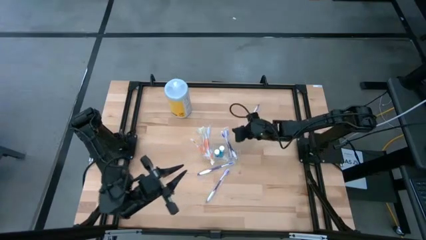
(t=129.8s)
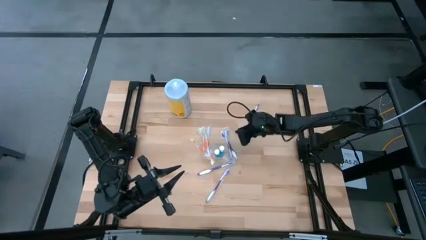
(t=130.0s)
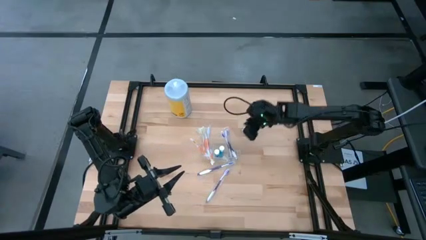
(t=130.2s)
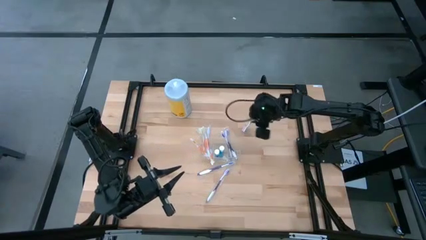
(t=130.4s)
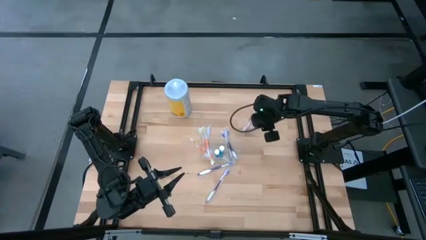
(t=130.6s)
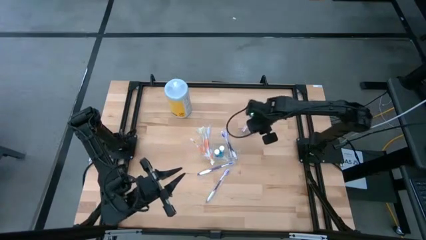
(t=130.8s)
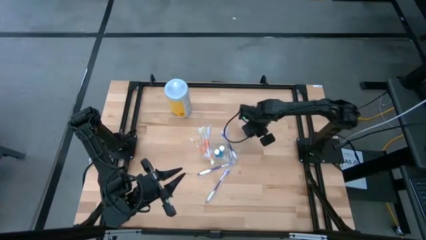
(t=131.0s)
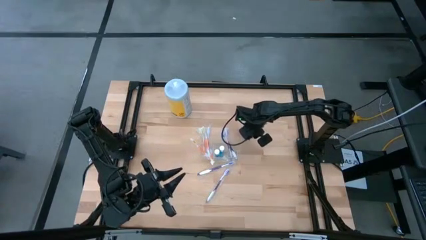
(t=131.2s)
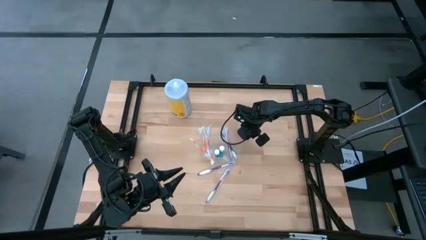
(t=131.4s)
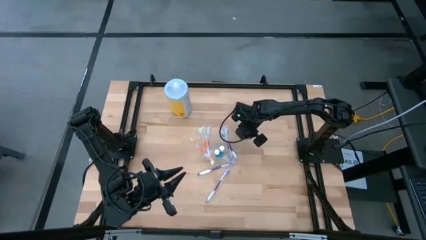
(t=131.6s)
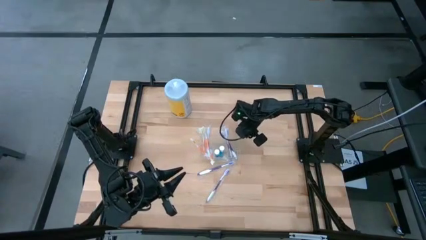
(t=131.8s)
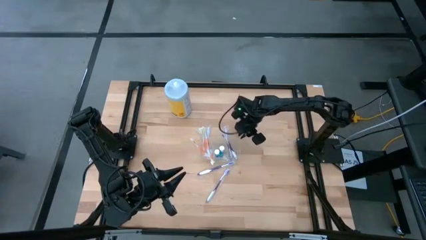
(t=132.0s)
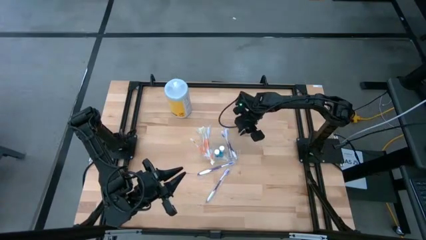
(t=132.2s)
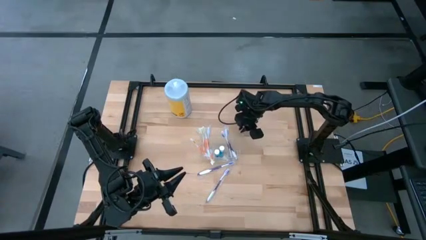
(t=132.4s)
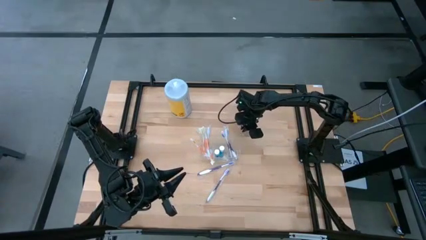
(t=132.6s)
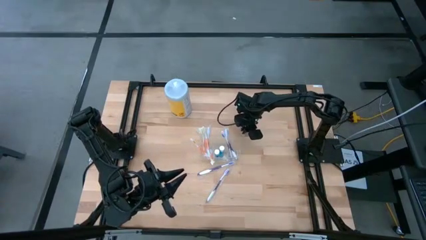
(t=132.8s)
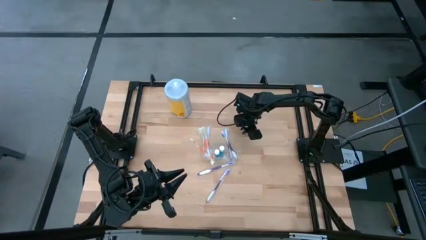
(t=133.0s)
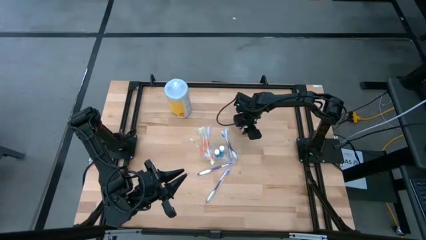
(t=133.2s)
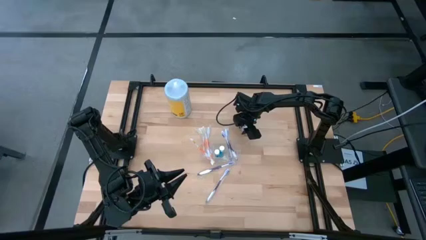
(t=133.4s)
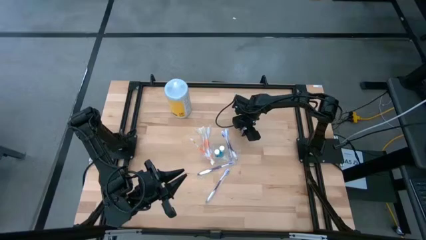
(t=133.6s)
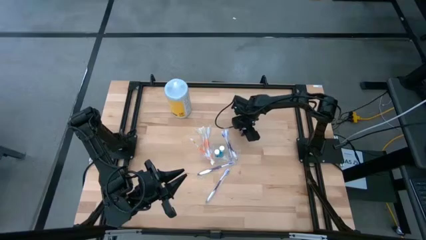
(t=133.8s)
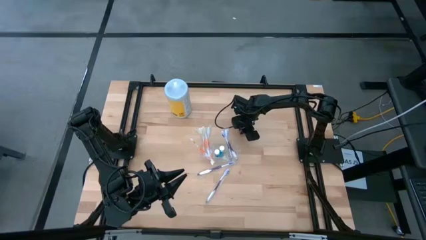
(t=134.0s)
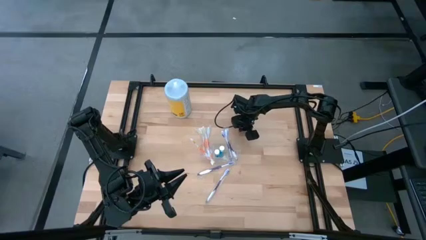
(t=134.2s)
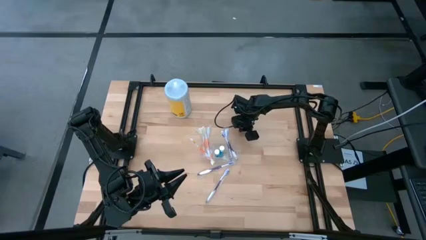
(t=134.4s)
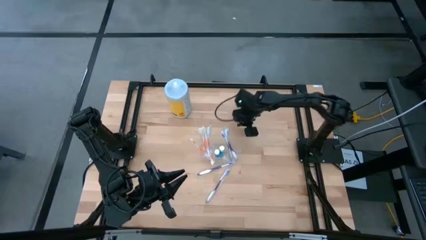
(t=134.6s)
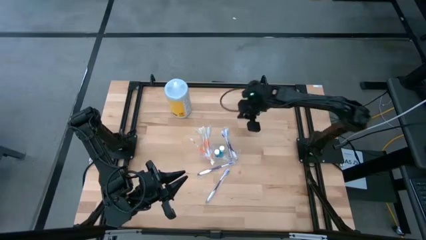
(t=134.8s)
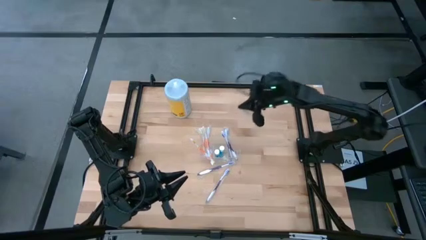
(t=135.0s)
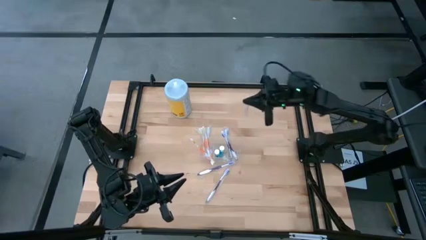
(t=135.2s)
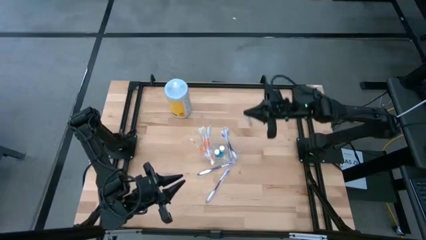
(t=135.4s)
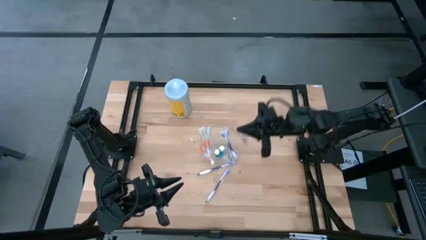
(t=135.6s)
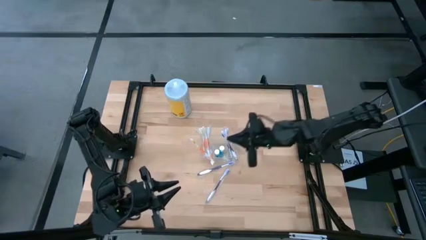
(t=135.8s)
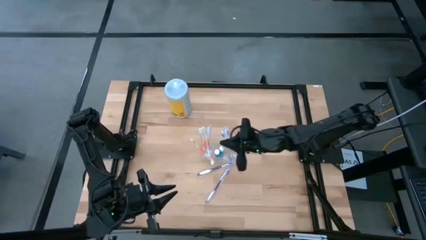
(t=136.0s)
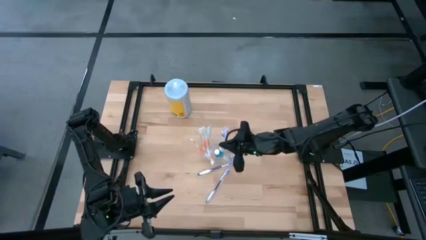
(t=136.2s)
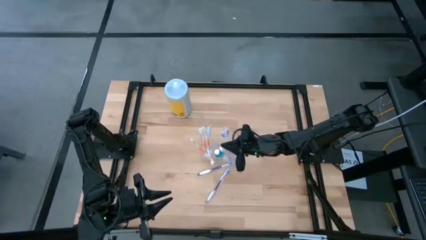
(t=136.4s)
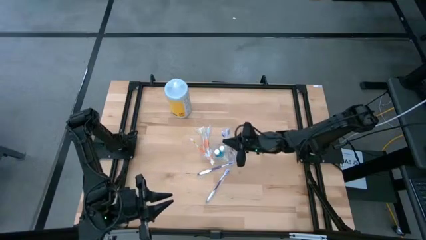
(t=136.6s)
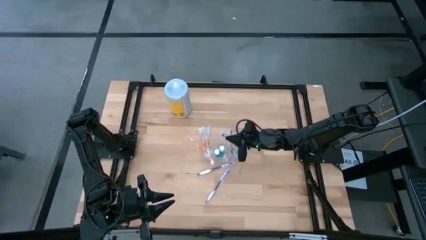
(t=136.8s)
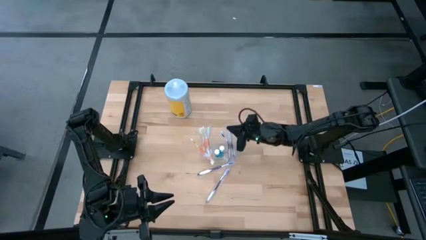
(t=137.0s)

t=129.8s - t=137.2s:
Task: Pick & Place toothbrushing station
Put the white and violet toothbrush into the right compartment of the transparent organizer

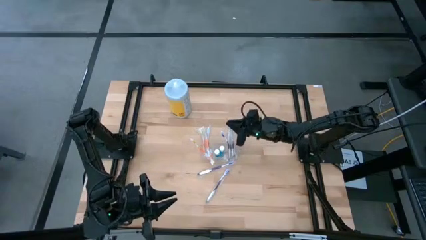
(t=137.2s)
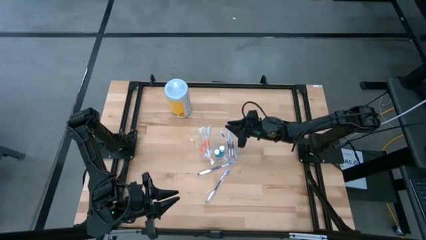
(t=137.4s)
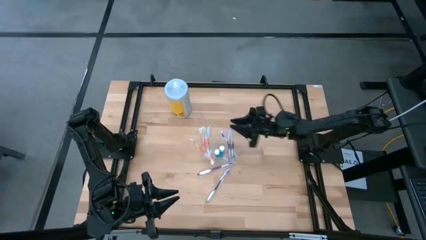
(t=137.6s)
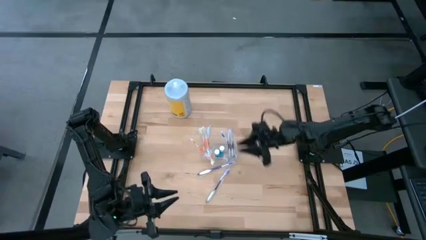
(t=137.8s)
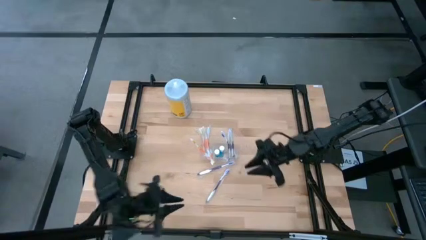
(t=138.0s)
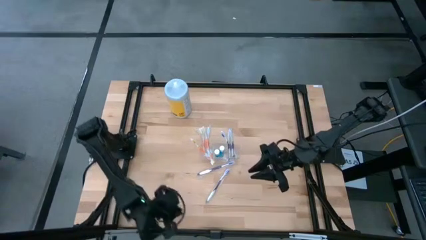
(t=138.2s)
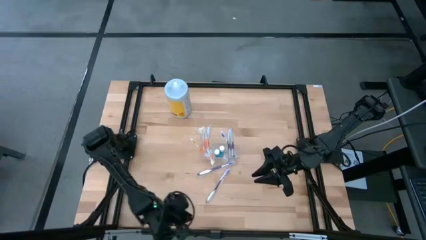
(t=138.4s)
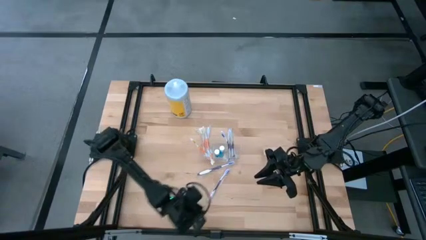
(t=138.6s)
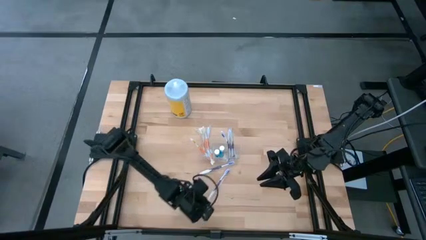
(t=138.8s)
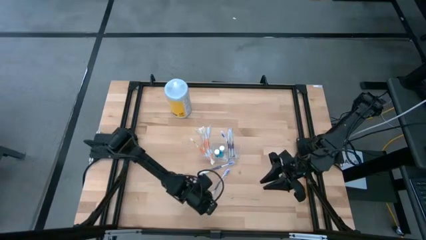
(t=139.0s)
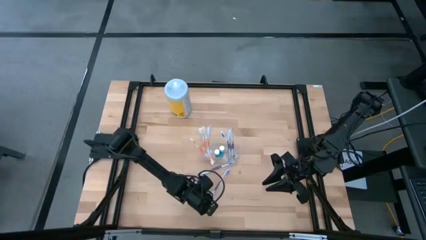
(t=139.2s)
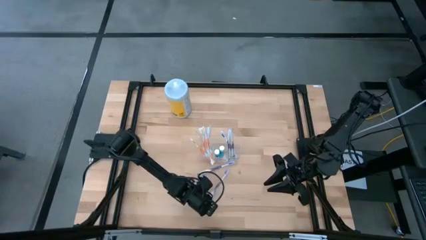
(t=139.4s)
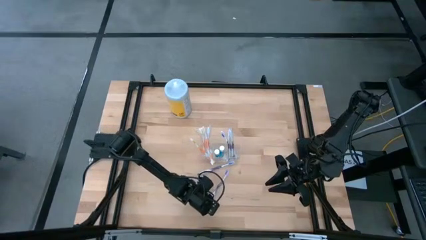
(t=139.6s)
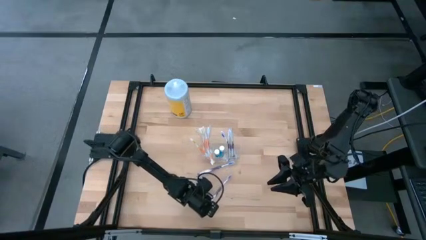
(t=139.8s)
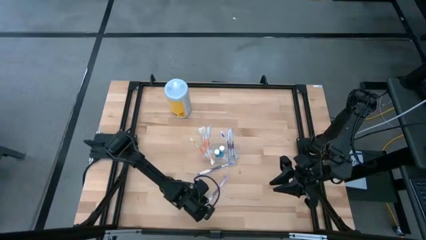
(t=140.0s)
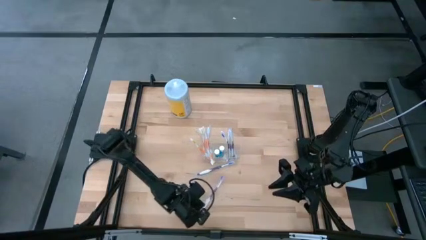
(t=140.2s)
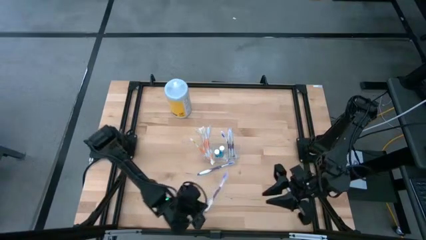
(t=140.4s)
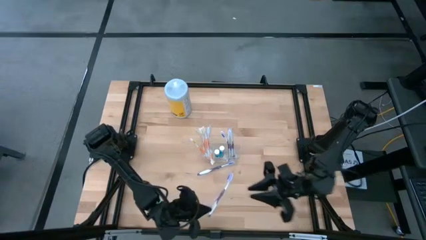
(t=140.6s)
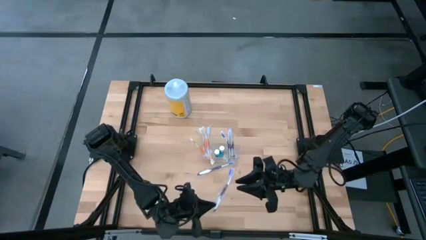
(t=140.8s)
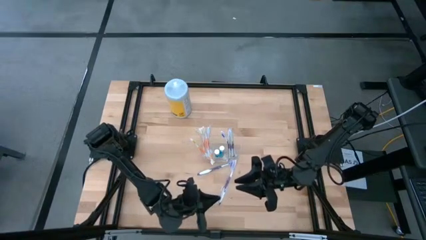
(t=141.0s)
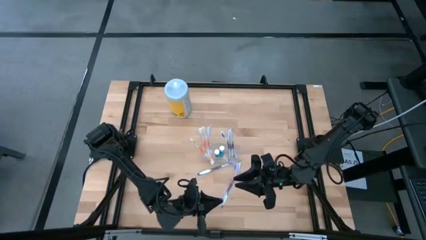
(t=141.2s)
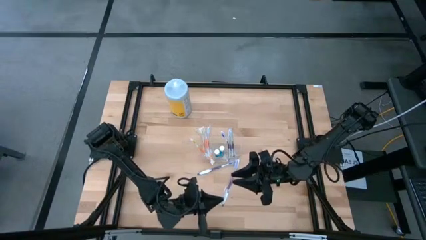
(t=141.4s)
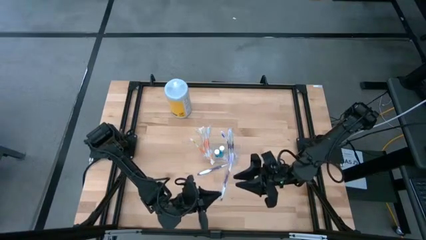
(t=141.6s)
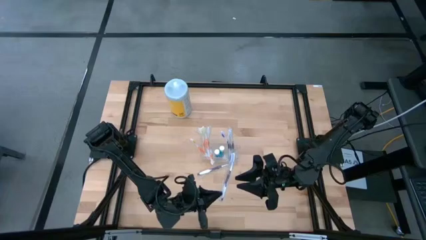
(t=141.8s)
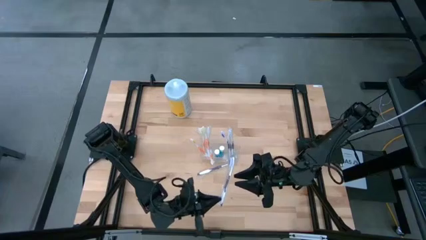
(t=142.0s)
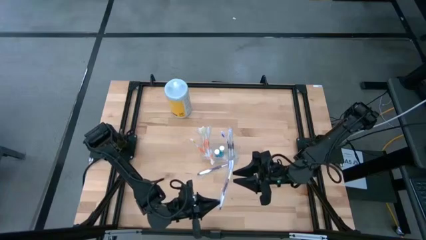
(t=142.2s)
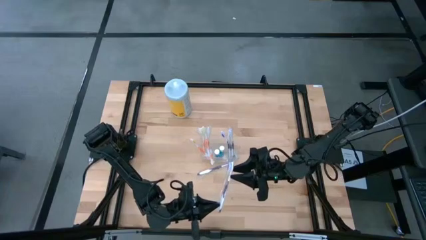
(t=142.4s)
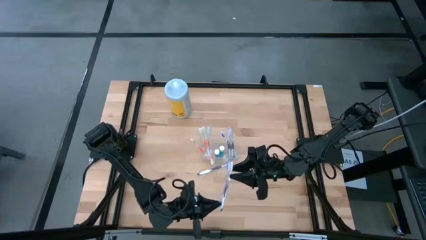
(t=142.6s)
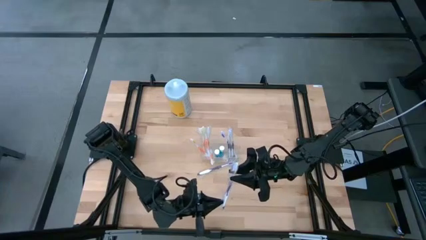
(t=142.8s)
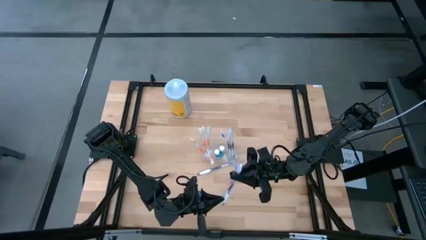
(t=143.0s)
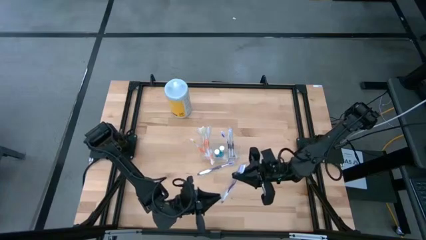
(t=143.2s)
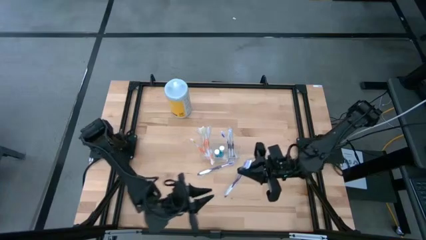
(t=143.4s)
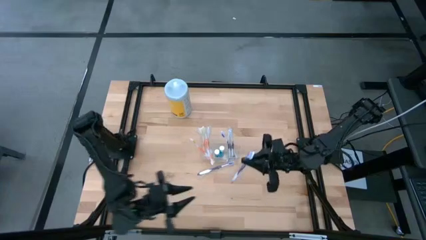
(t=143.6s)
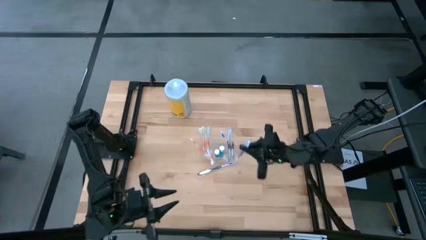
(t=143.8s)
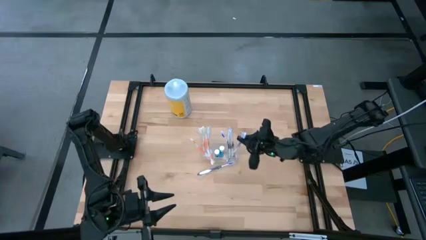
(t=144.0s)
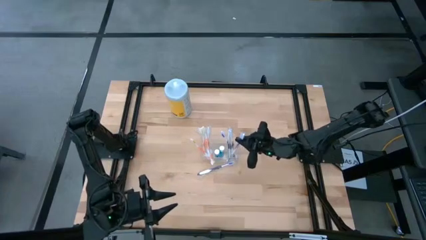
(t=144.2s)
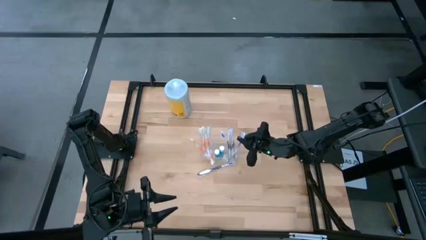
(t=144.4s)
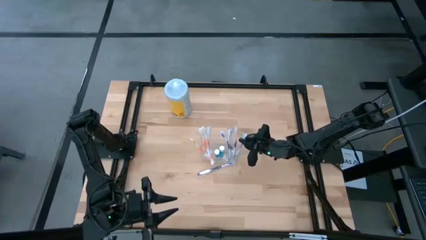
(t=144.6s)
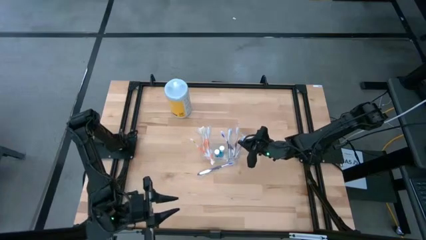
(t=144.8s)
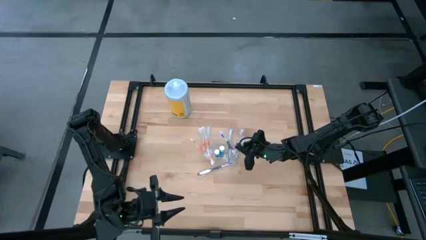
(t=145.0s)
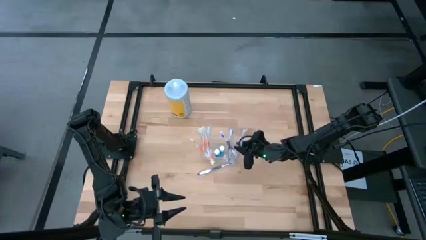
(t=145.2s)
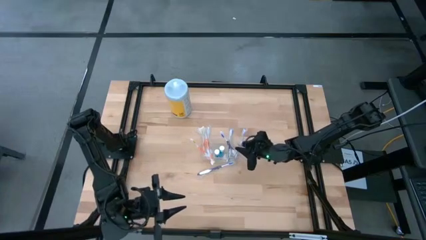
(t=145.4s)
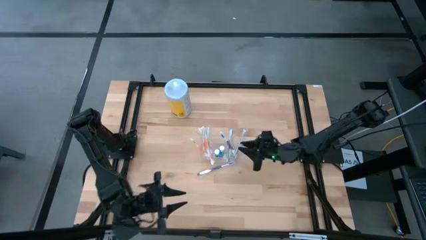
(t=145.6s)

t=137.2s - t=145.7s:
Put the white and violet toothbrush into the right compartment of the transparent organizer
